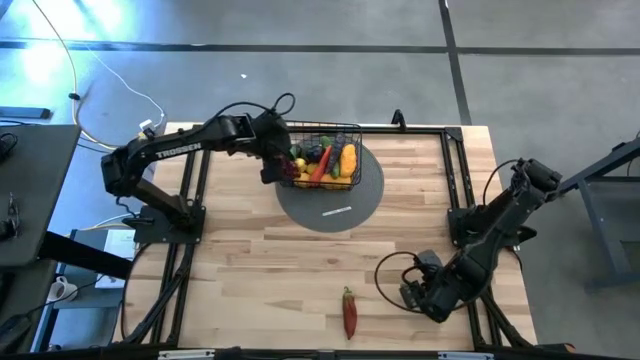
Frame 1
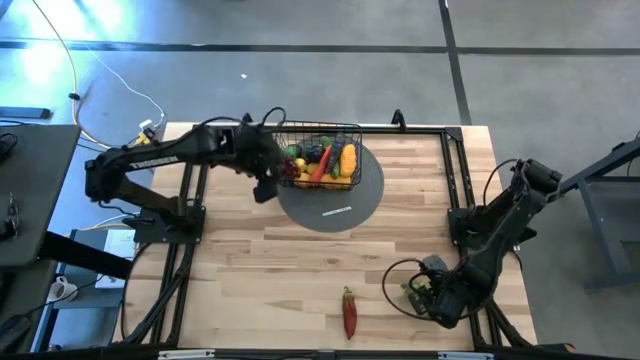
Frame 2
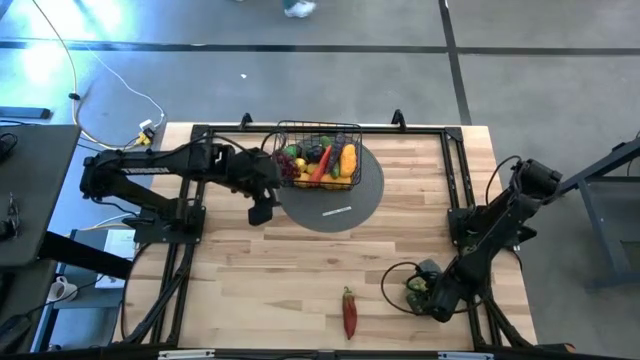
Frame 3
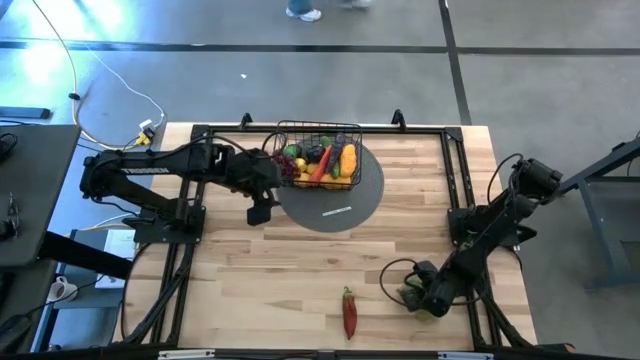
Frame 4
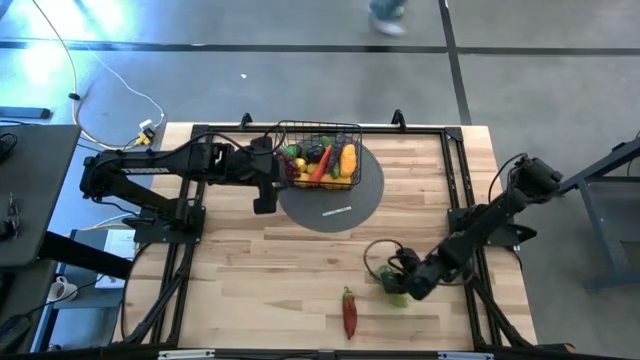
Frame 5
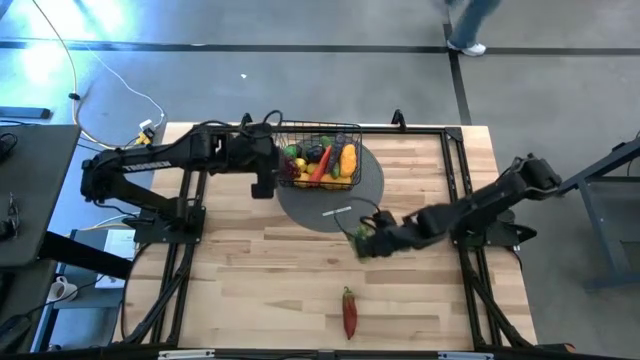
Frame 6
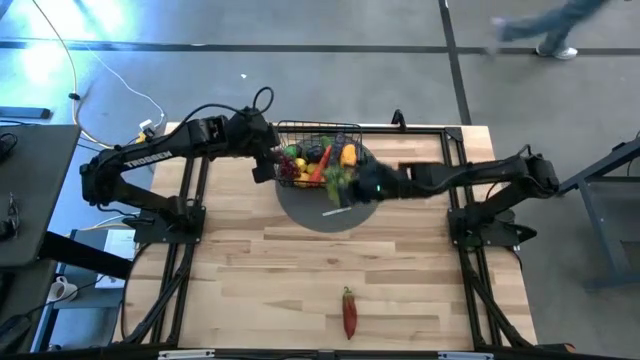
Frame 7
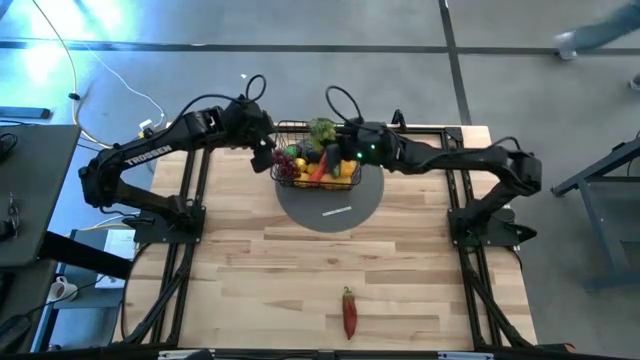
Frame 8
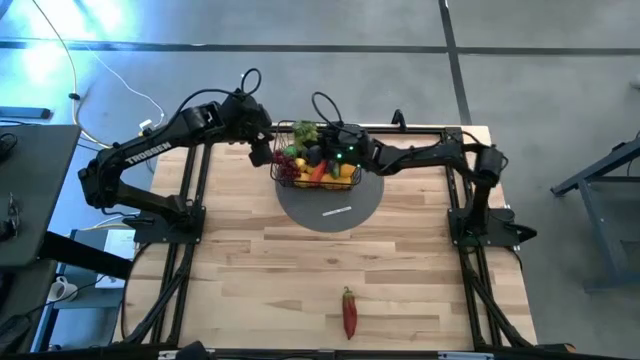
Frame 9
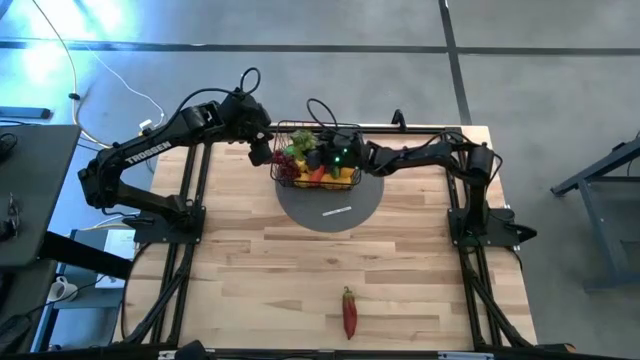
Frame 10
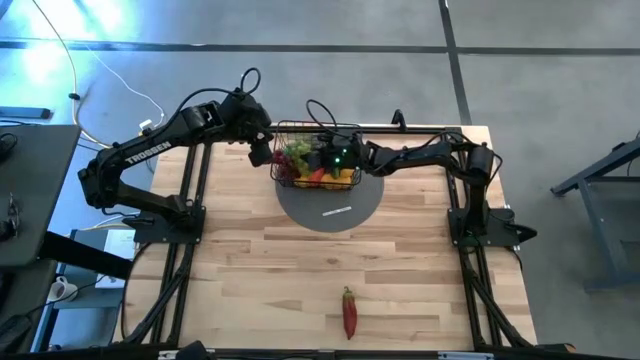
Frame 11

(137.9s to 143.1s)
Task: Build produce basket
Put the green grapes into the black wire basket

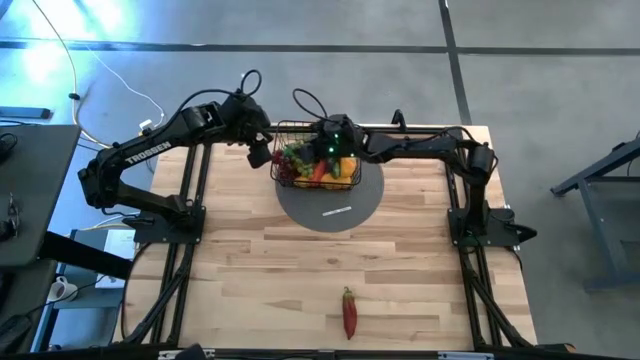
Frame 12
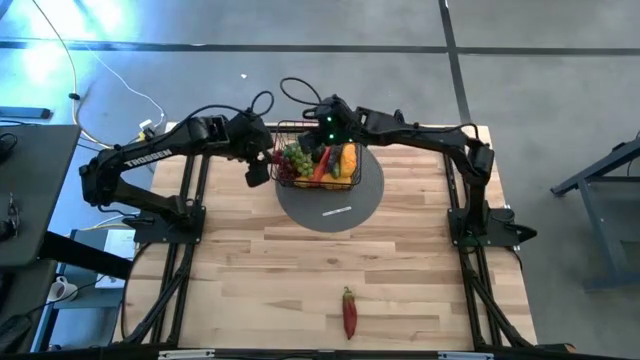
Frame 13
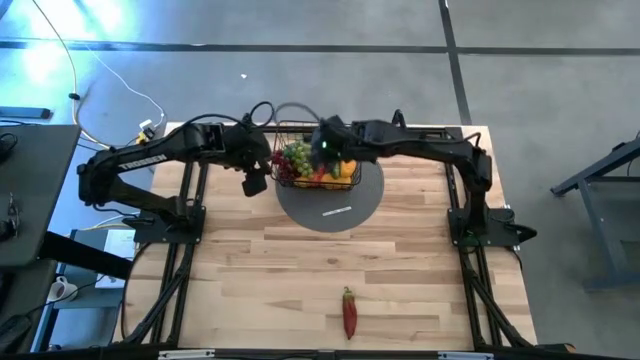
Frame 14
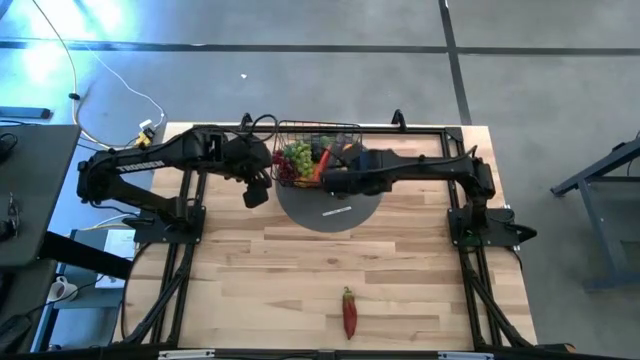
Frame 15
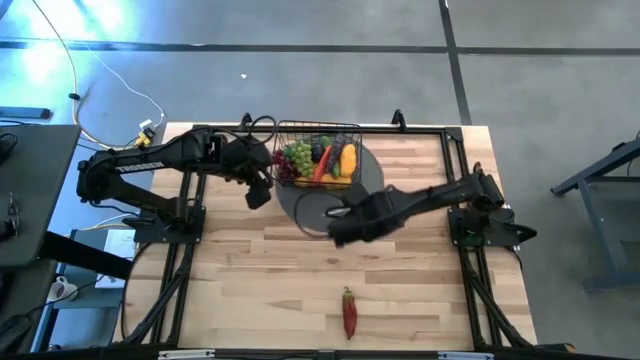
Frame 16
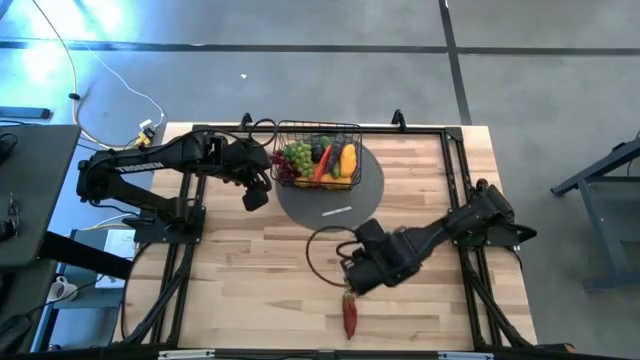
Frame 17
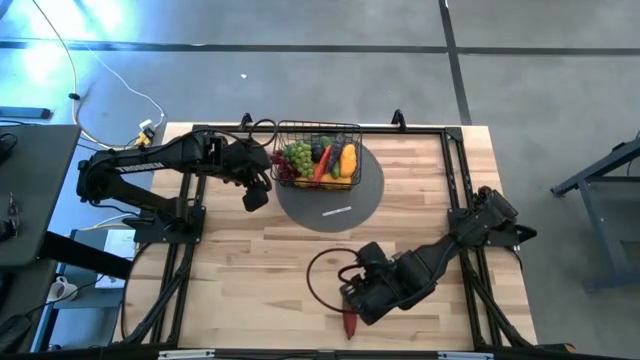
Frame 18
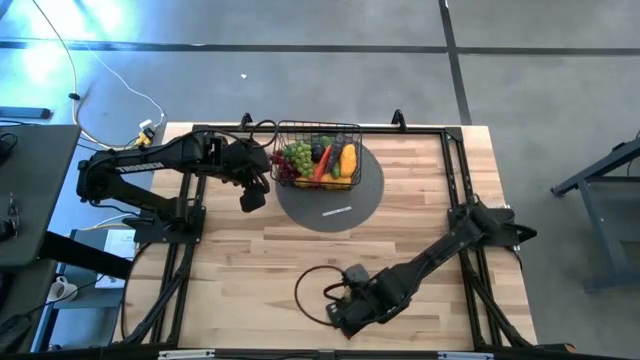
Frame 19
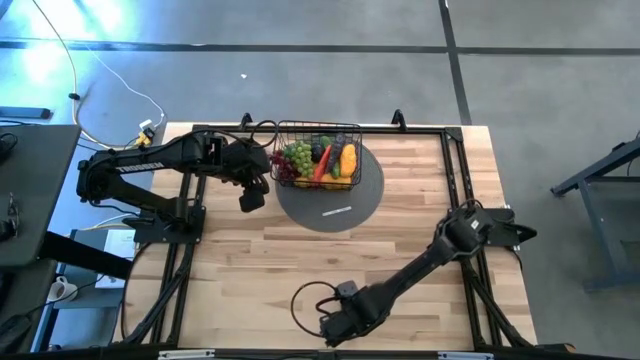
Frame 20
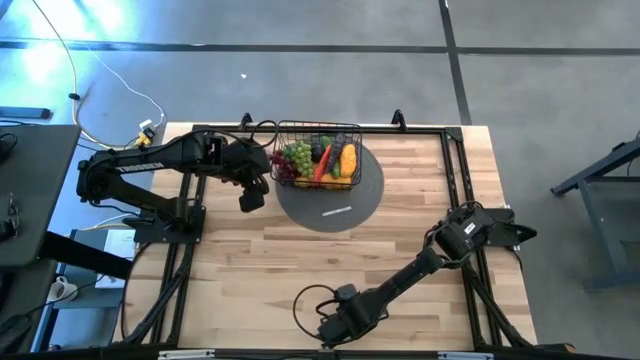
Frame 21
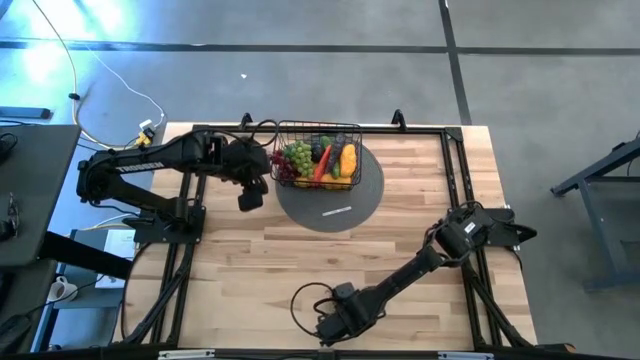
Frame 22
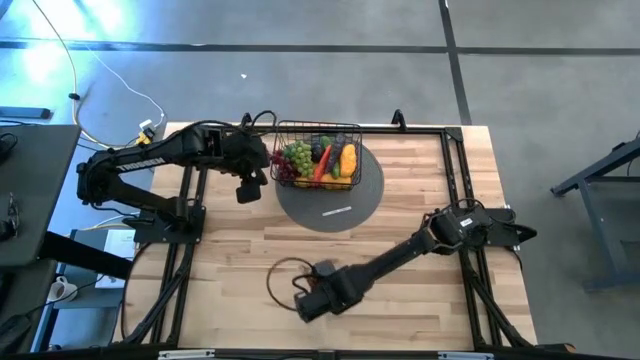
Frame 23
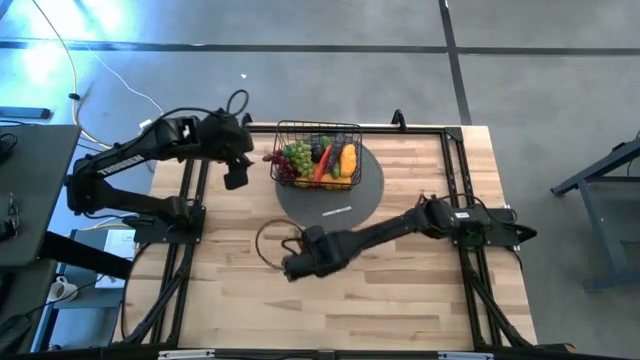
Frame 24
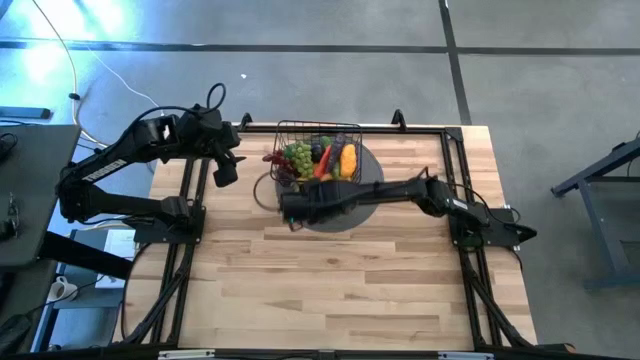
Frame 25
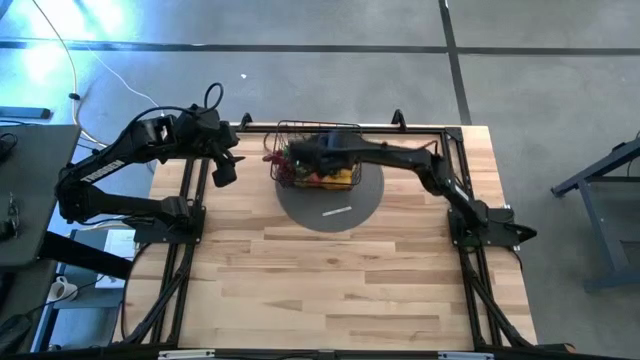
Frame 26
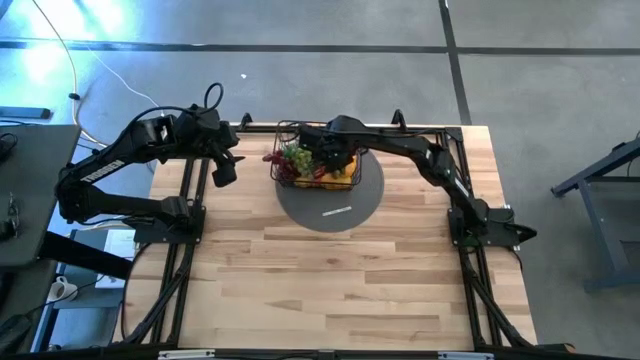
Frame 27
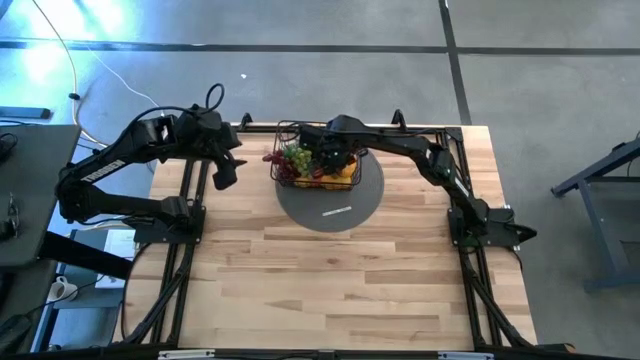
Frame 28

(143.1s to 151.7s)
Put the red chili pepper into the black wire basket

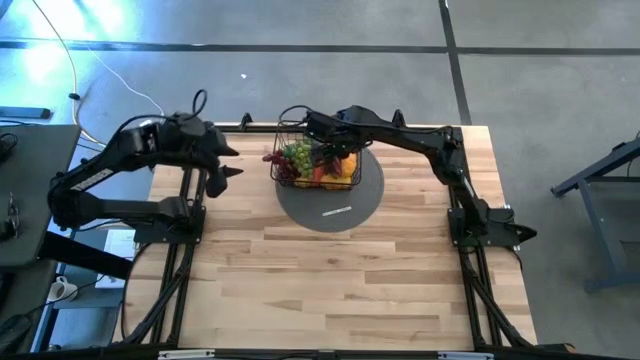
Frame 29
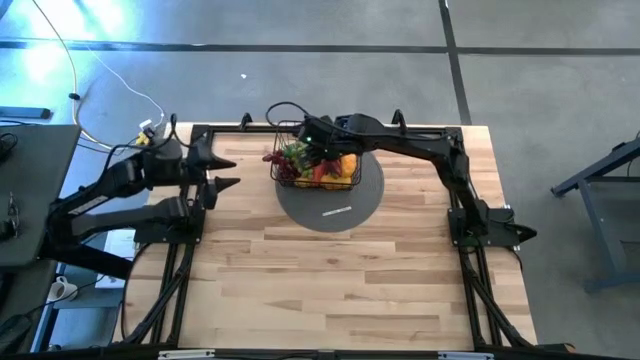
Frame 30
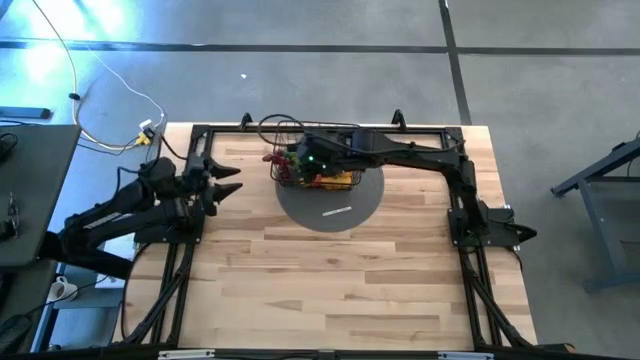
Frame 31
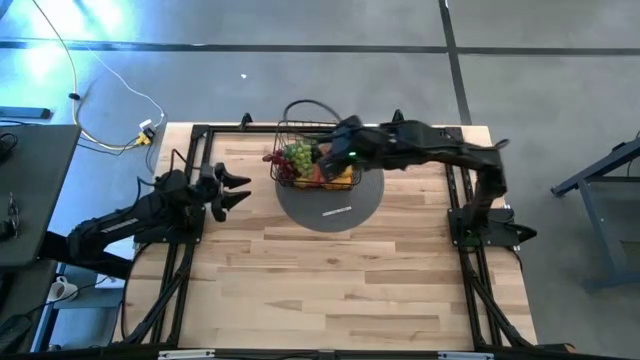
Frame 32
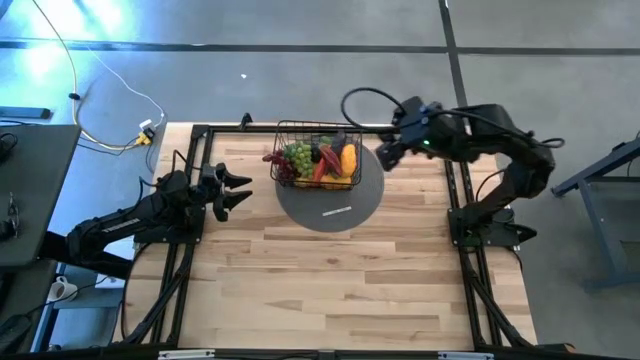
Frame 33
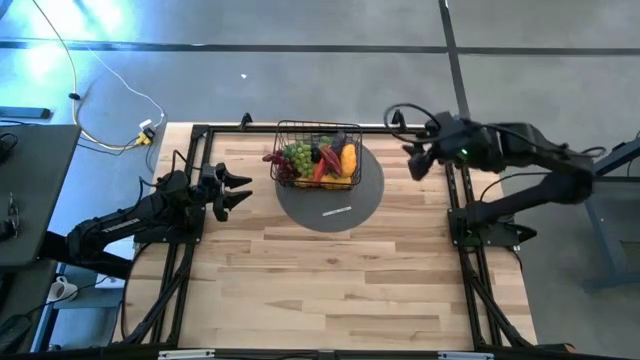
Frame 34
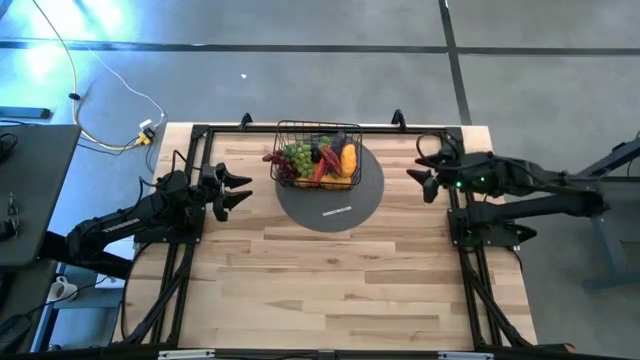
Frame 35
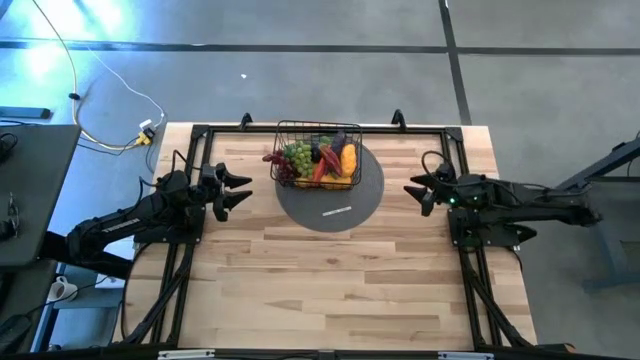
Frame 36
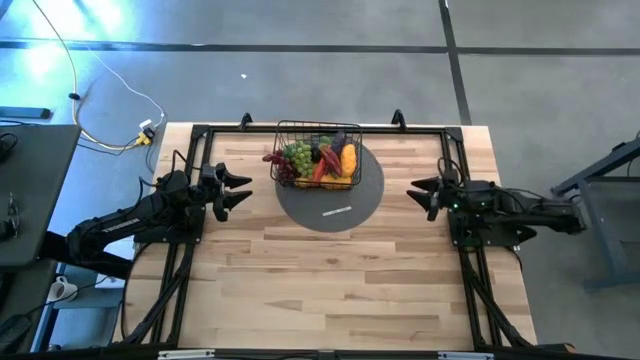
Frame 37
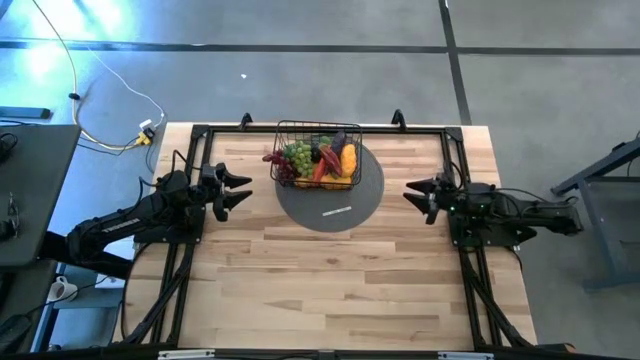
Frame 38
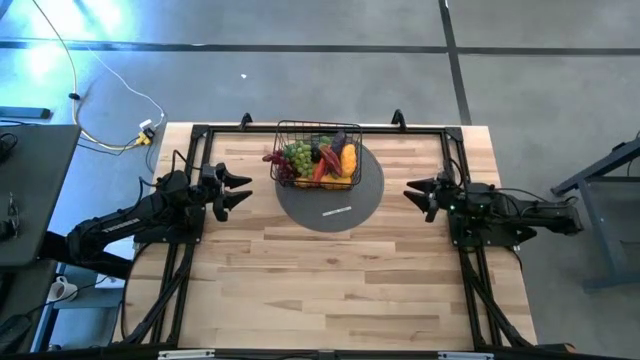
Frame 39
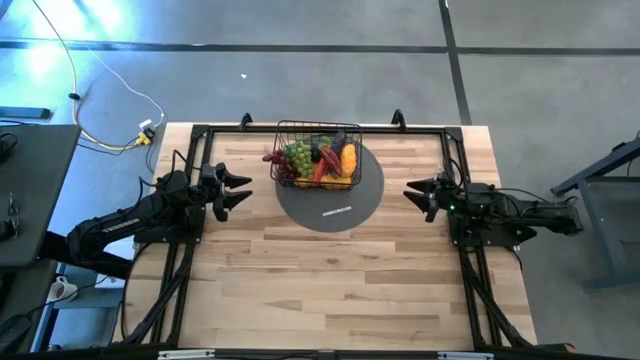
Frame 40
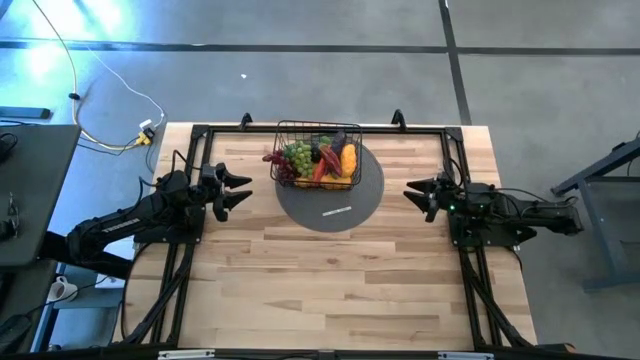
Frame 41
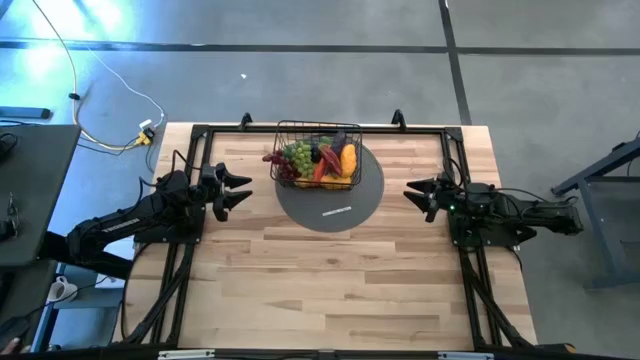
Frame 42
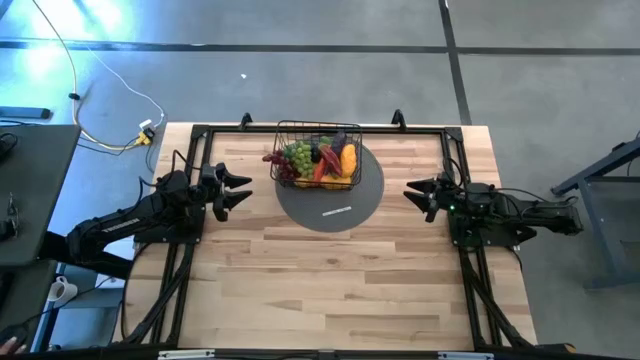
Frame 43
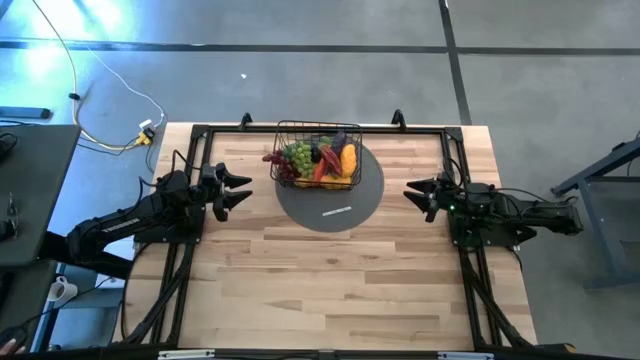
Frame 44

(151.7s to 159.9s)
Return to Home Position
